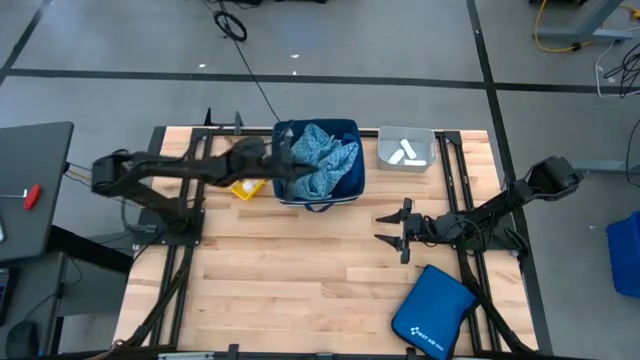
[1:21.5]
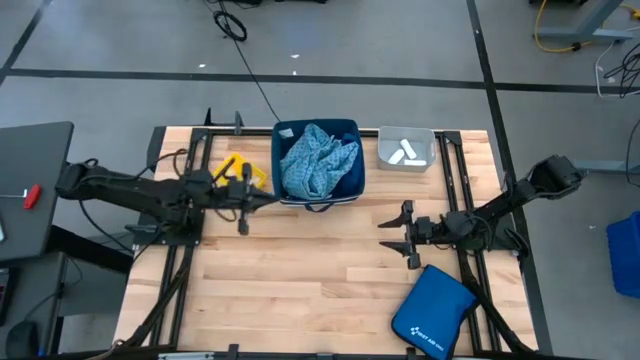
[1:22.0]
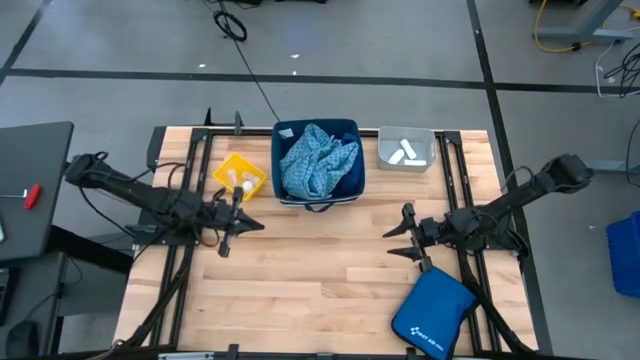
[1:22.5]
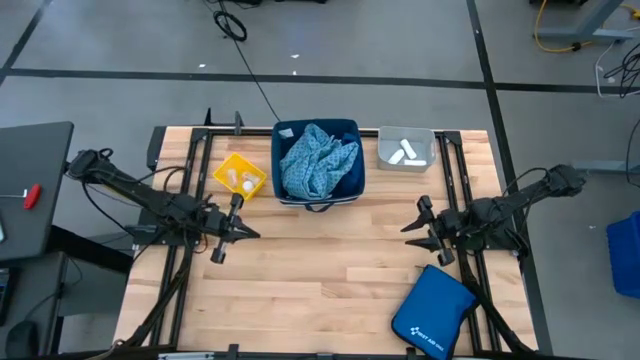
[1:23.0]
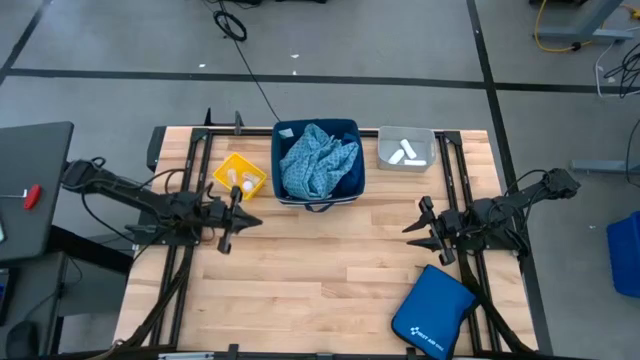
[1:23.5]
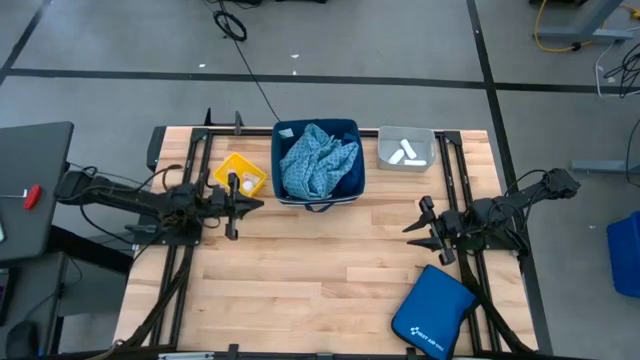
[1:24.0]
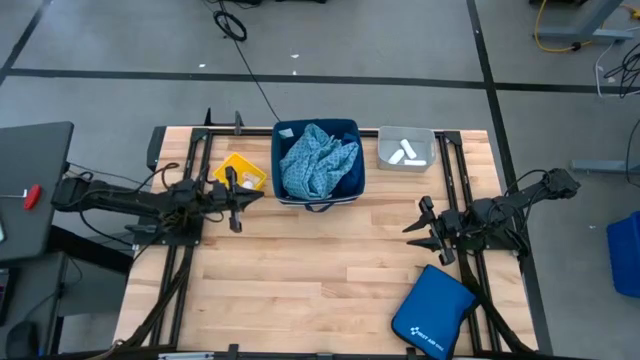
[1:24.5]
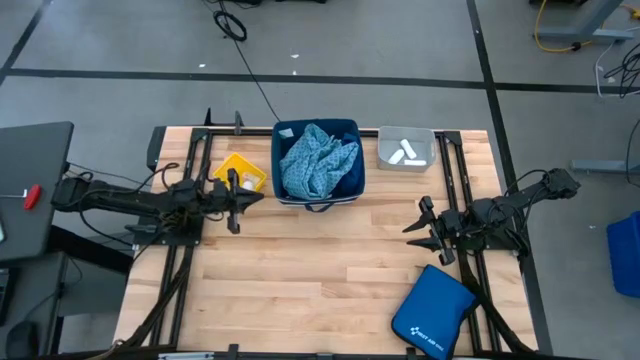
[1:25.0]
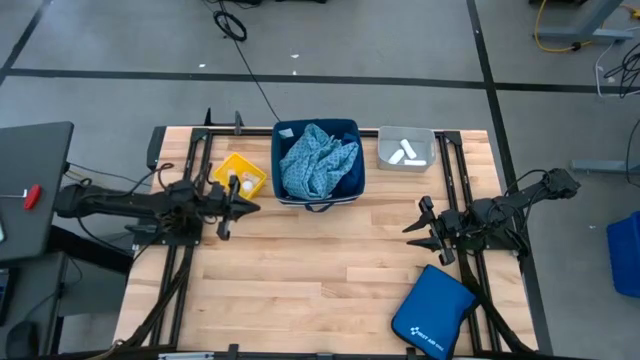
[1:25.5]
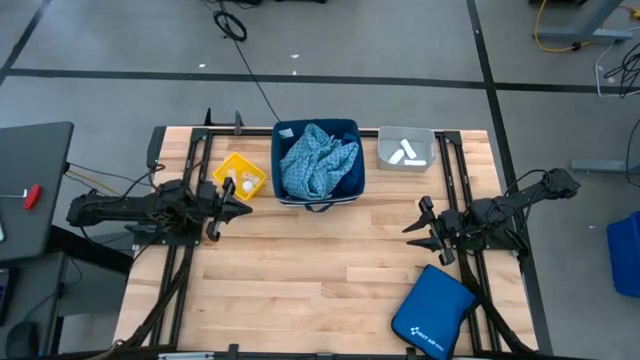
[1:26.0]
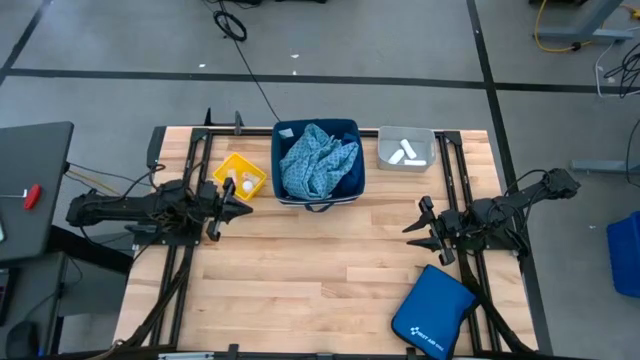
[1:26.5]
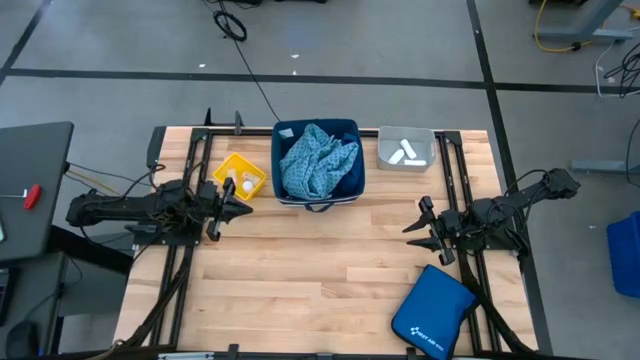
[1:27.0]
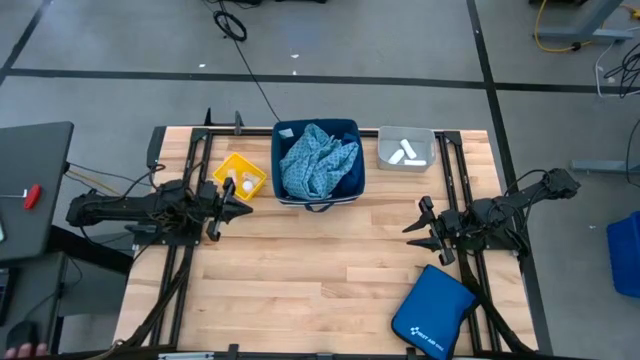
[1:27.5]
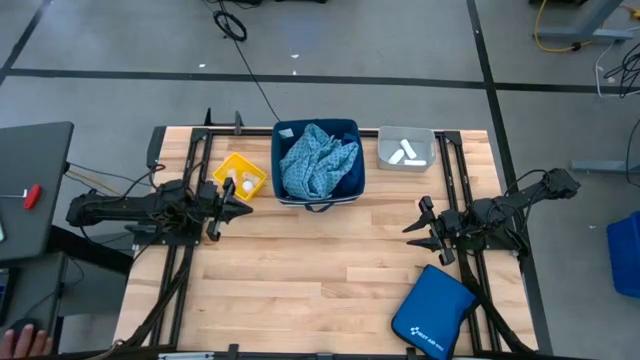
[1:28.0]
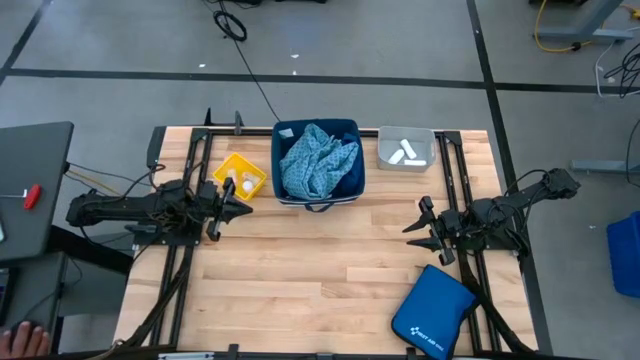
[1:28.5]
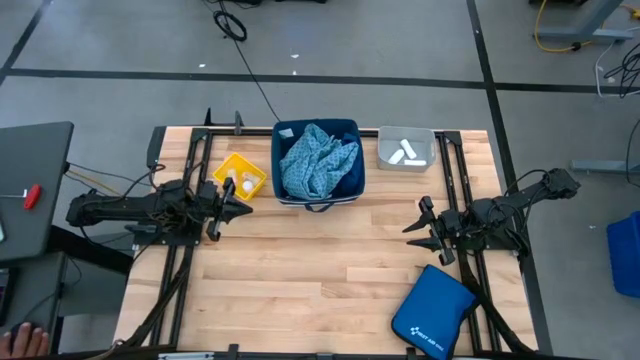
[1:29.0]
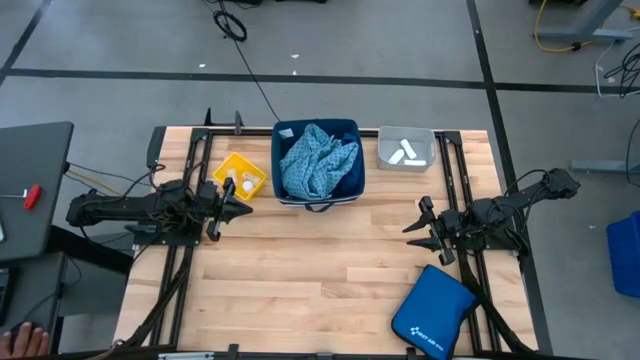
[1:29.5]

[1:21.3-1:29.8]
Task: Pick & place medical supplies in basket/bin
Return to Home Position

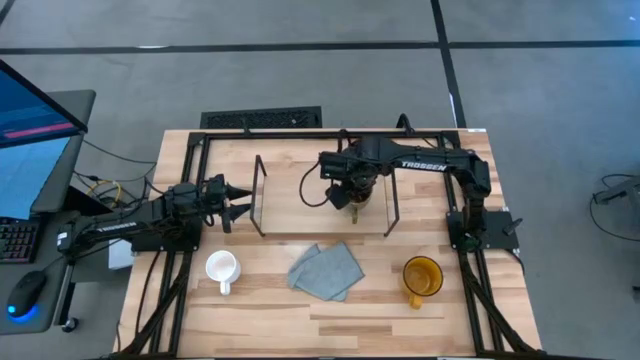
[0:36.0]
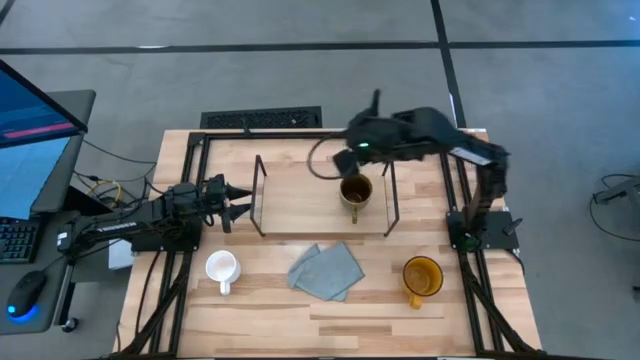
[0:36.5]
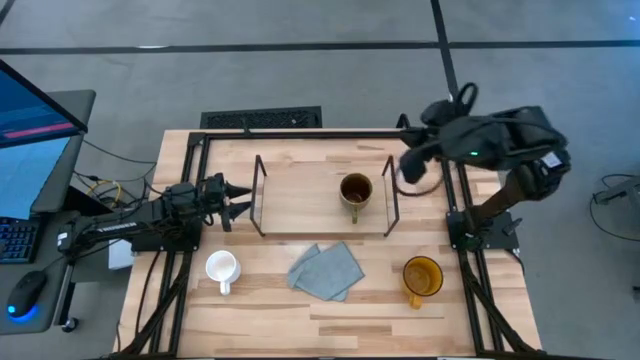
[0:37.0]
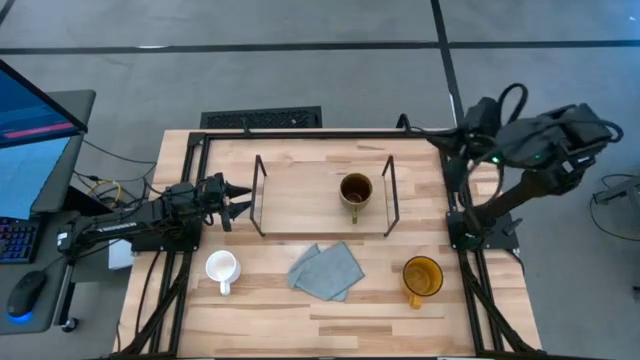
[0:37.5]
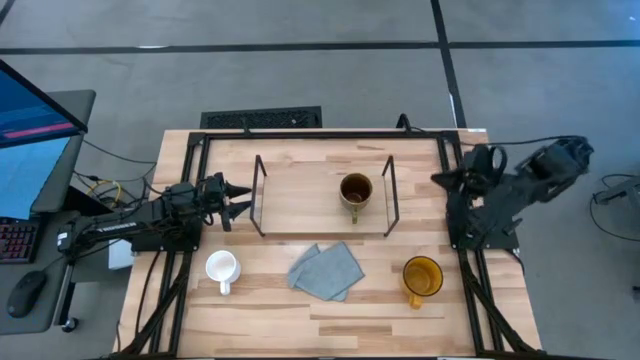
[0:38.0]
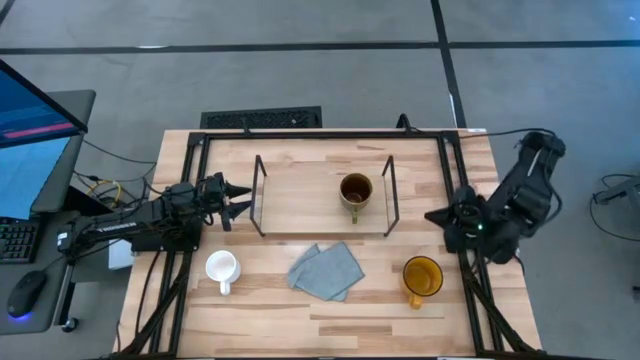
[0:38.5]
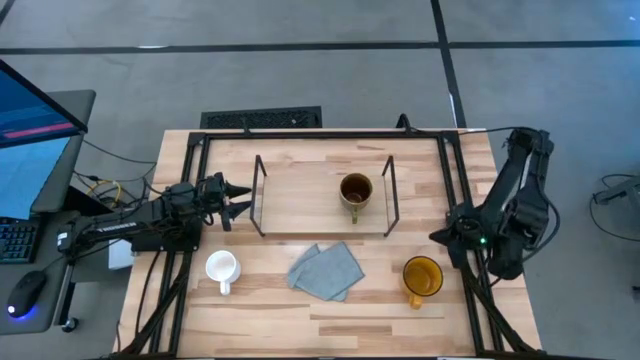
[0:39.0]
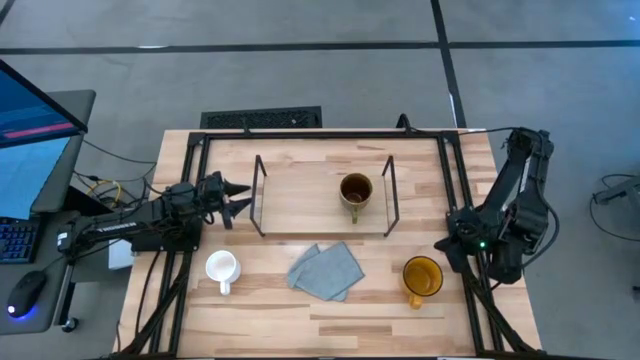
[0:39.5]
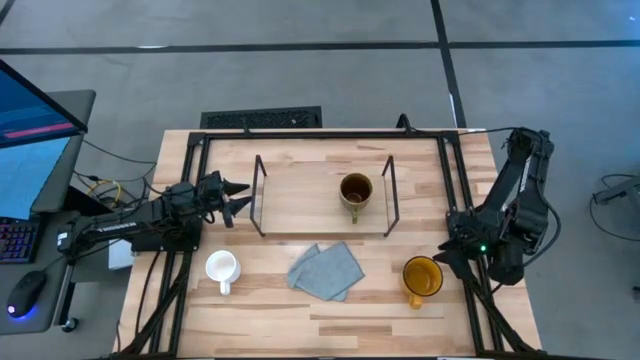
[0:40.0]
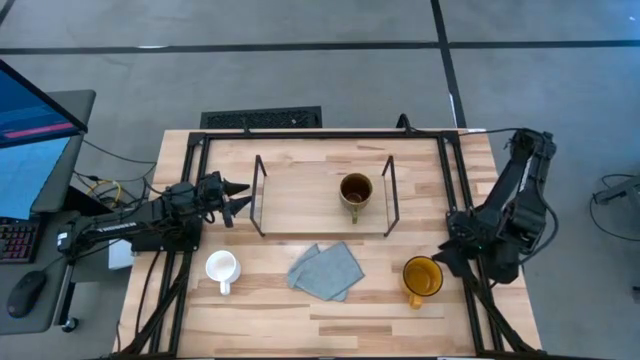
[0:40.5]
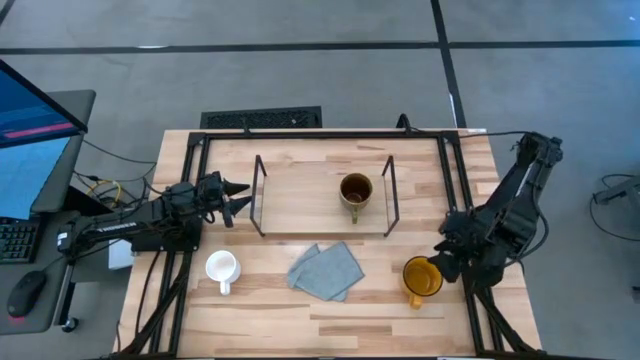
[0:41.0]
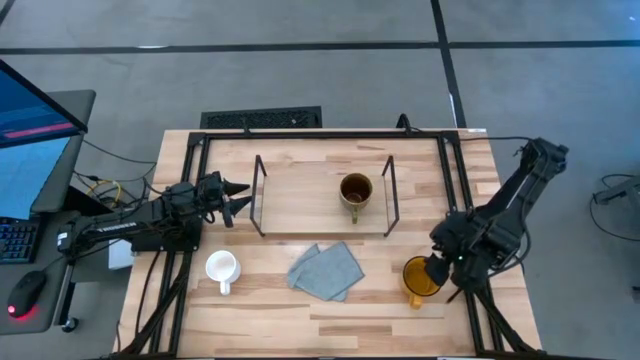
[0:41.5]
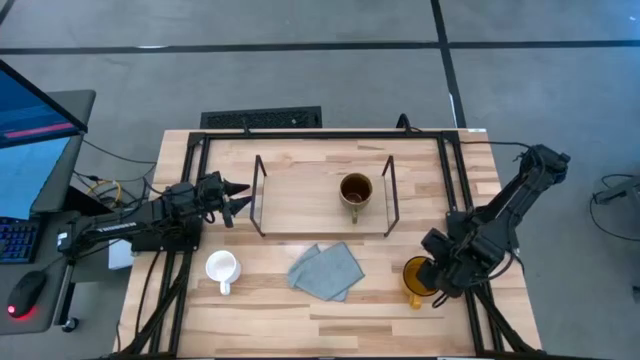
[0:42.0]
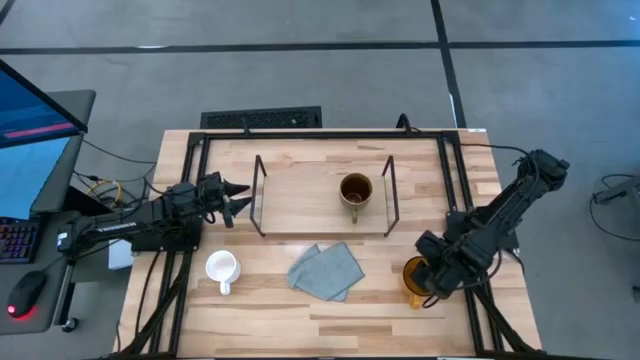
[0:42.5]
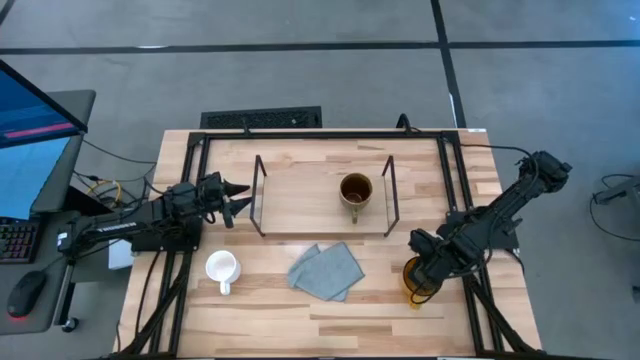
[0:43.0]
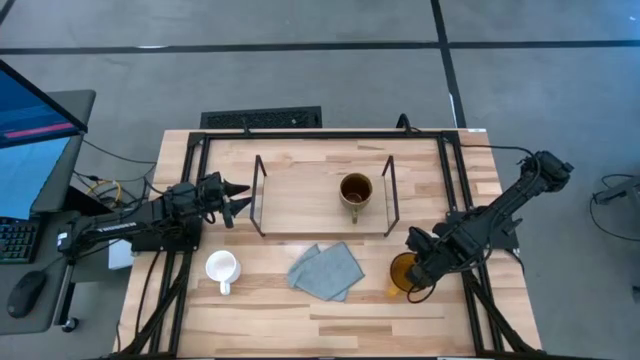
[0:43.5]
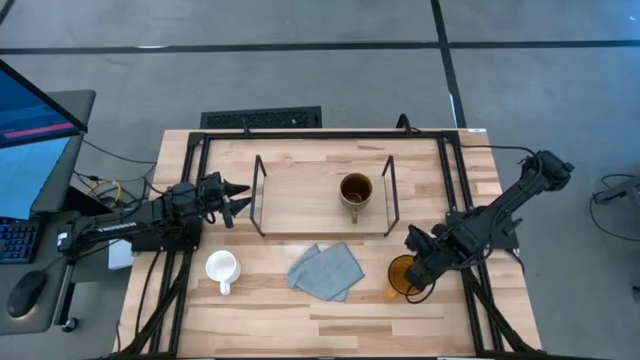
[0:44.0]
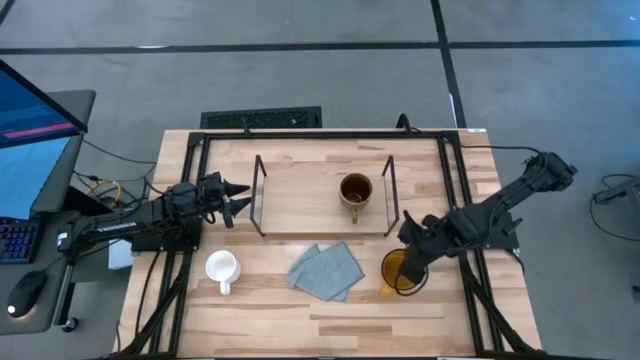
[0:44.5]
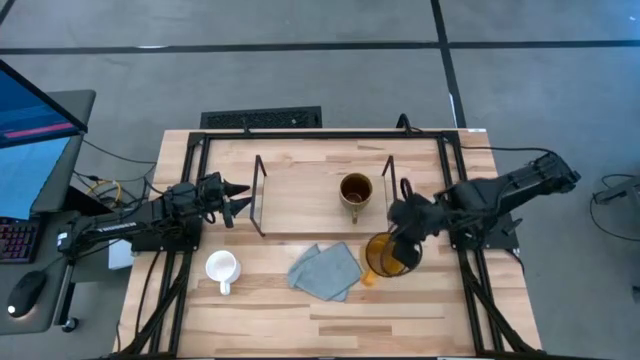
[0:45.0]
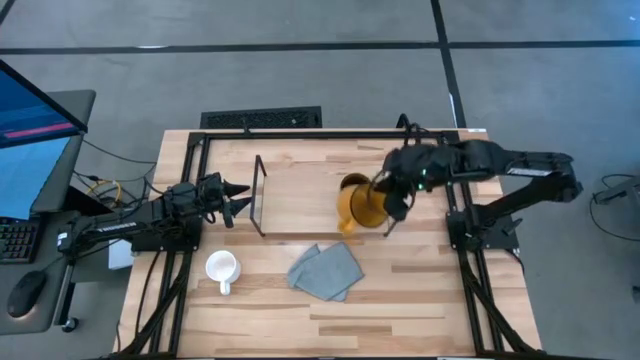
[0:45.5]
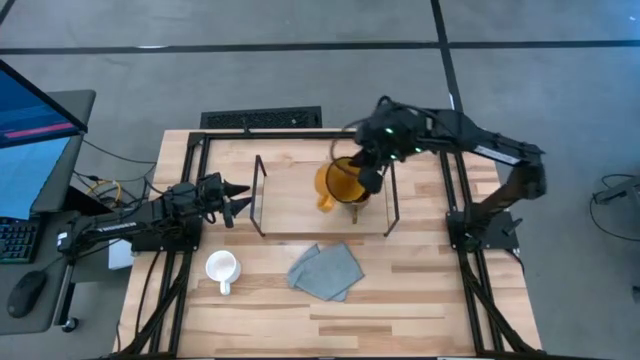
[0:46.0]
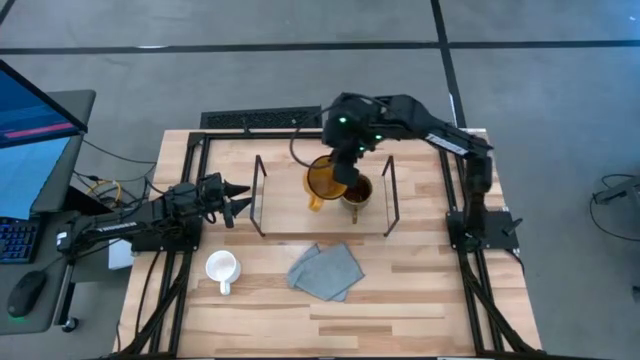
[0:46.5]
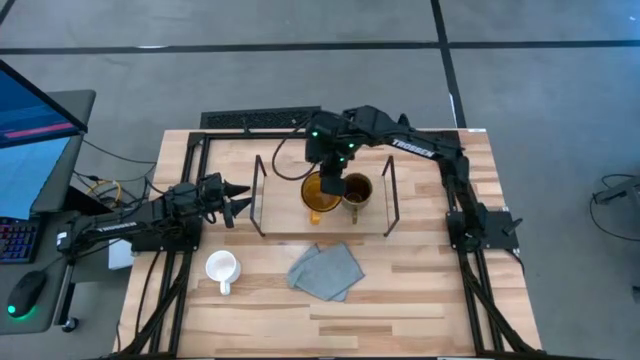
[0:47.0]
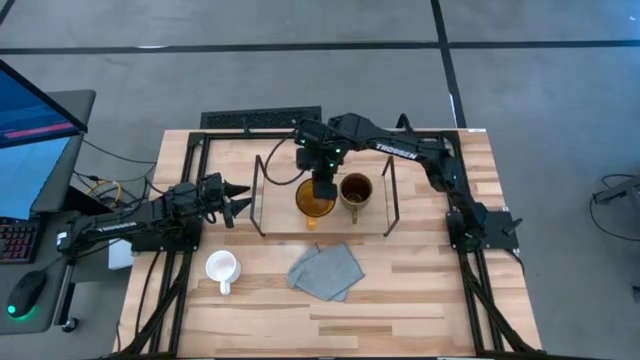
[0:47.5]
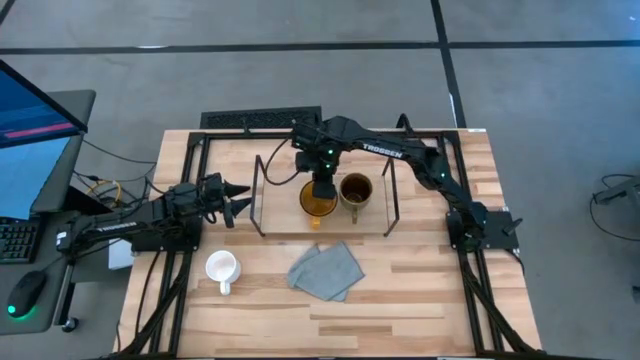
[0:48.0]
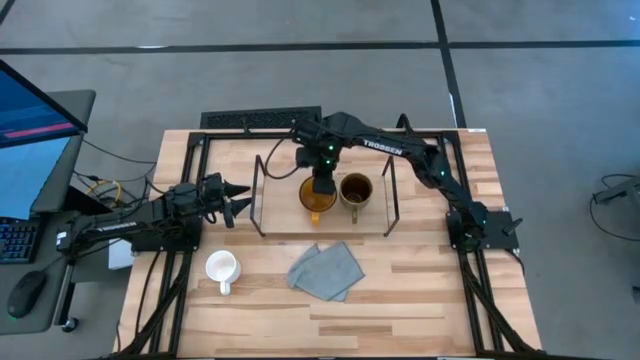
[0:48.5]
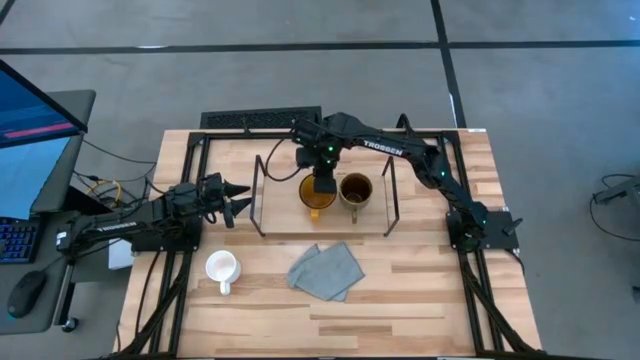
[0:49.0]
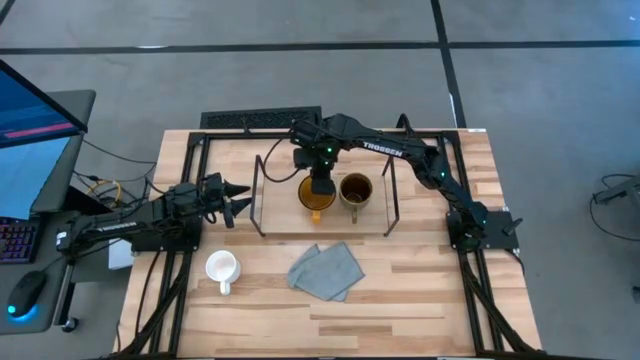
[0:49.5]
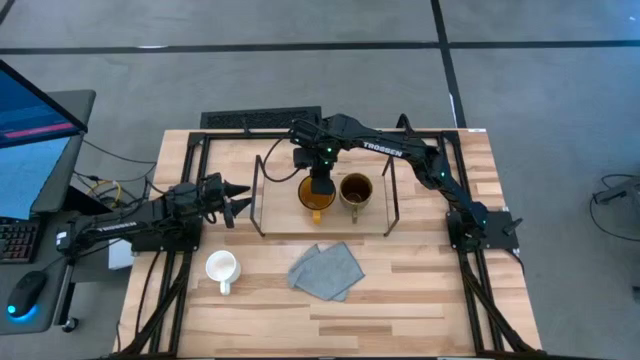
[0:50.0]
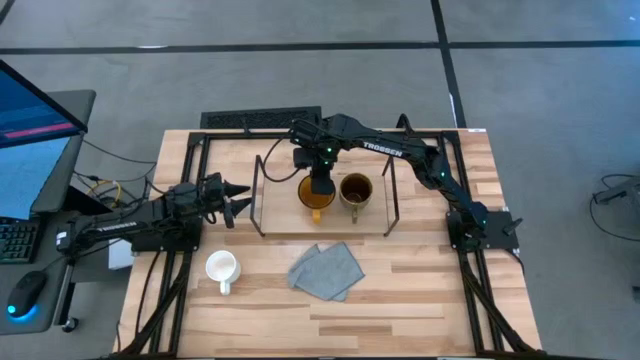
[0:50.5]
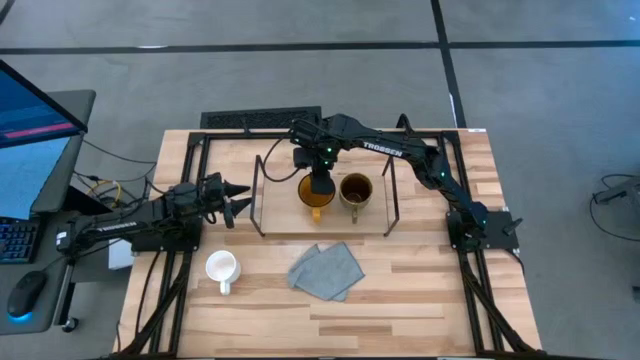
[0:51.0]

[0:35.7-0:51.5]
Task: Stack small to large cups/mugs on shelf
Put the yellow mug on the shelf
